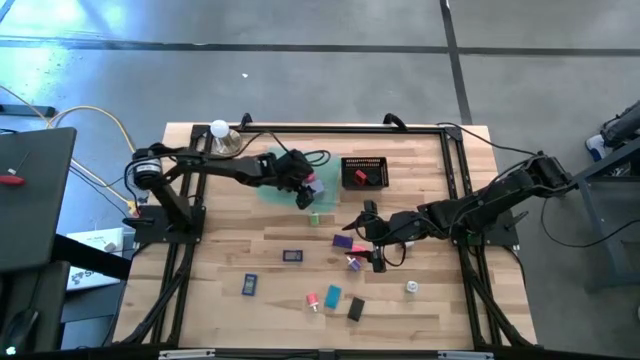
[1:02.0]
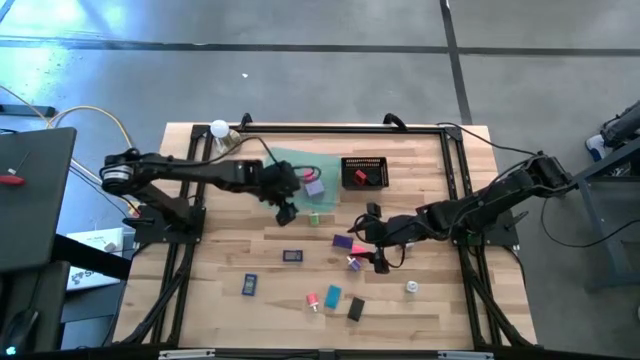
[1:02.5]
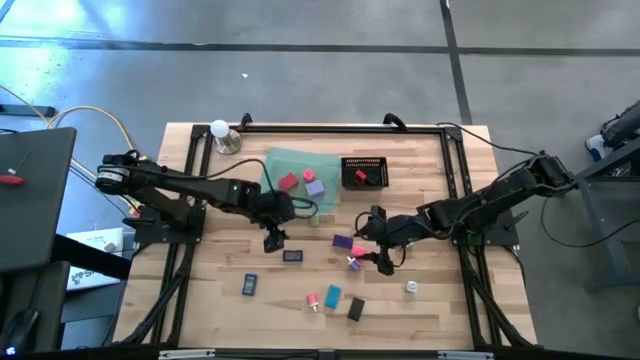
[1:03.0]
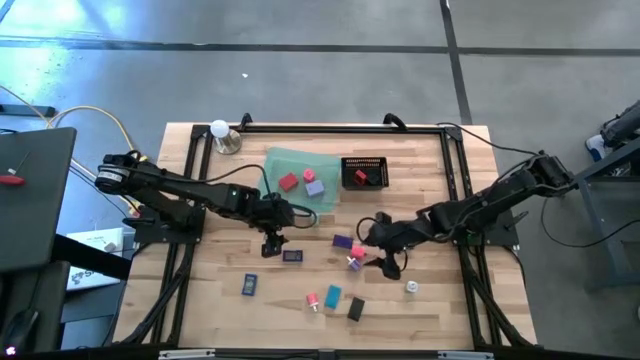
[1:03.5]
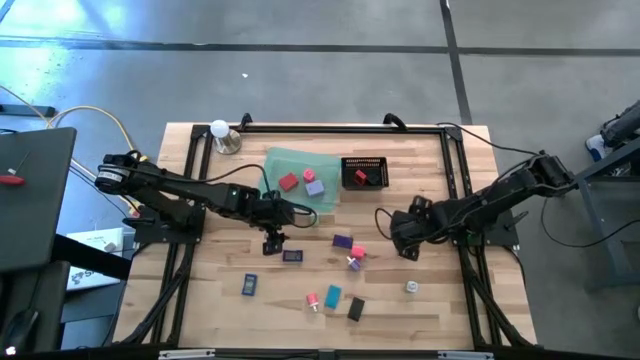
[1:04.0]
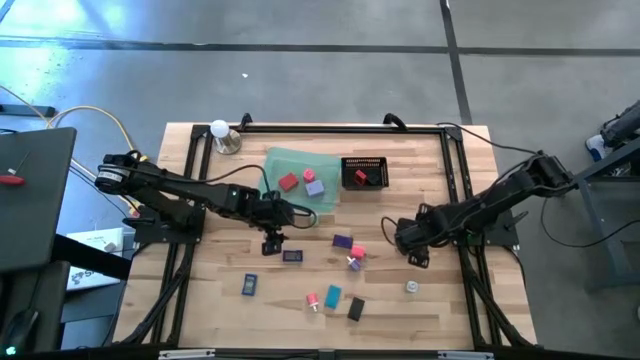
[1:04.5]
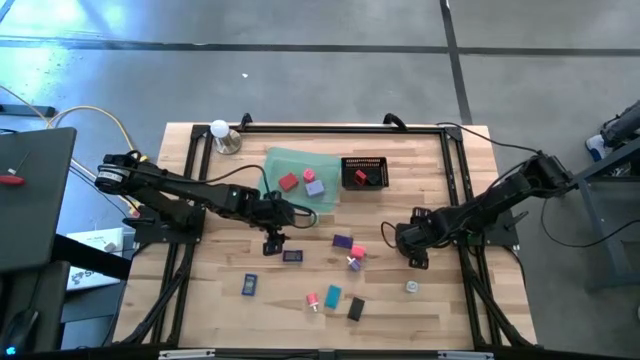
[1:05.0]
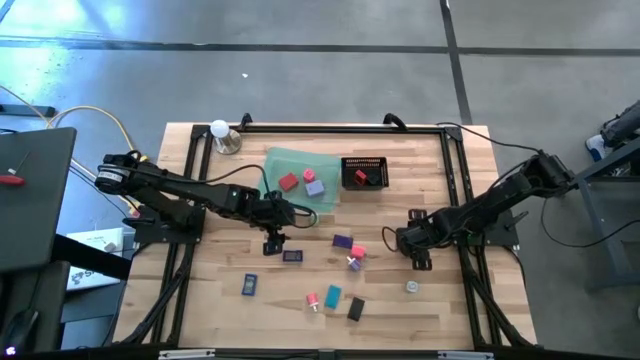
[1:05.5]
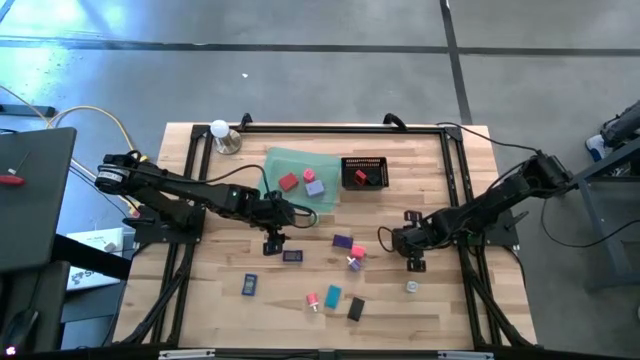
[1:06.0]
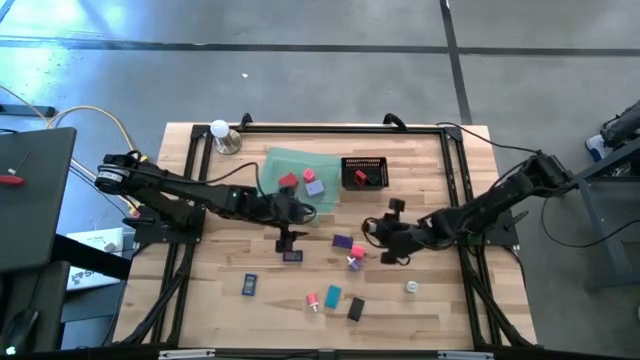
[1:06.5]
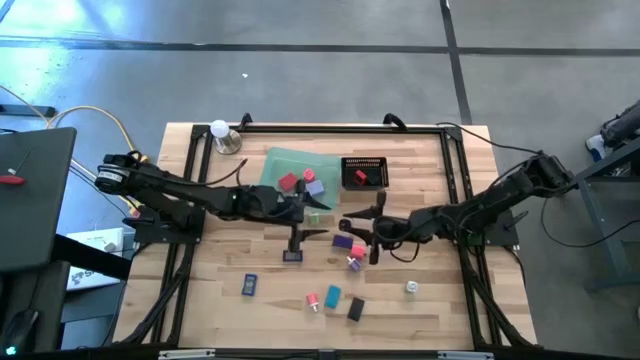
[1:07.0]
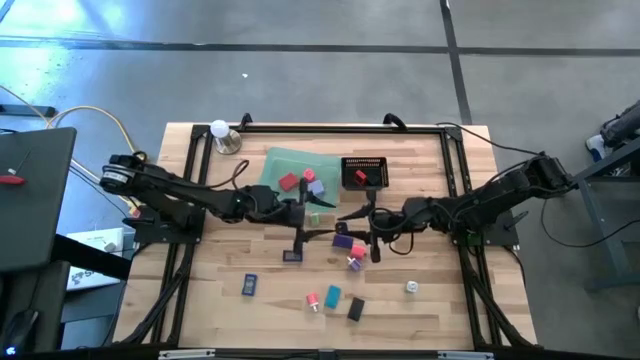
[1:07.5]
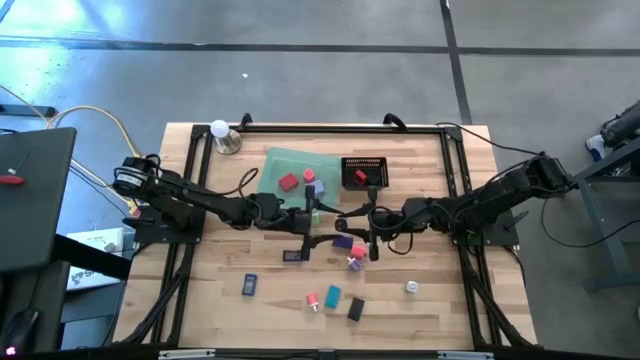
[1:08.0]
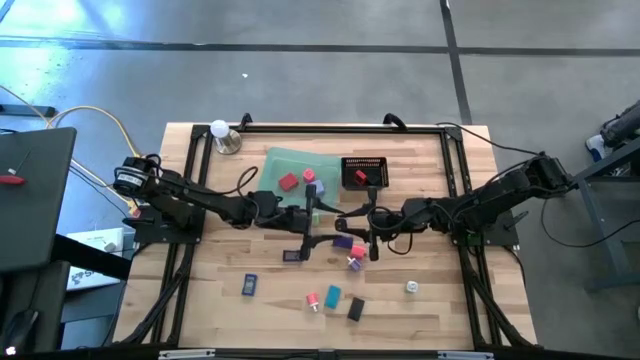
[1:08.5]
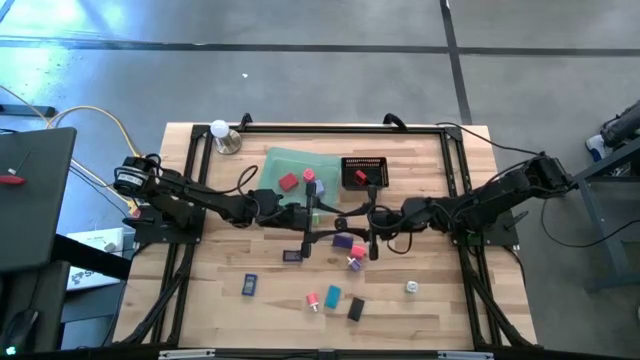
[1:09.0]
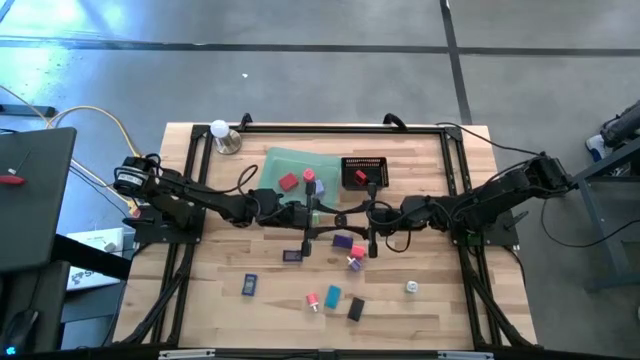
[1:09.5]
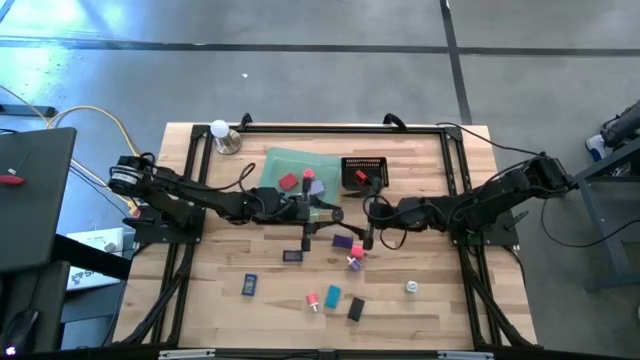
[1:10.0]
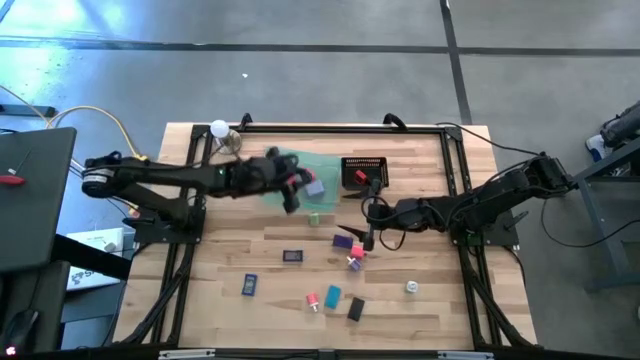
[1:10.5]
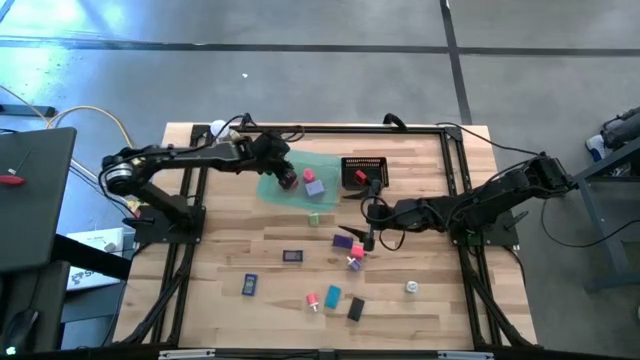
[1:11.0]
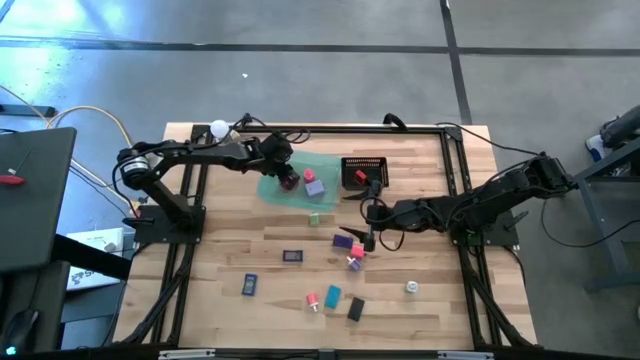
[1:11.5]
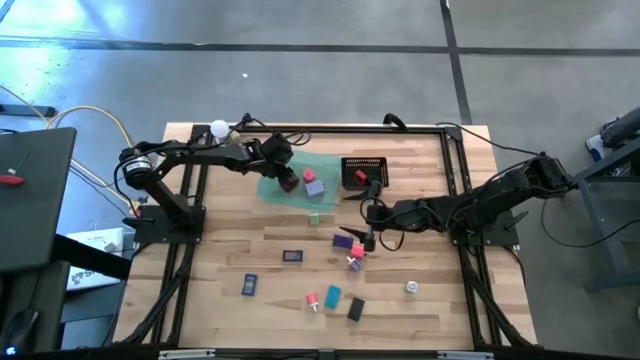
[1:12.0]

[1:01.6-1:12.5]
Task: Pick & Place Office items
Put the white charger adapter into the green bin

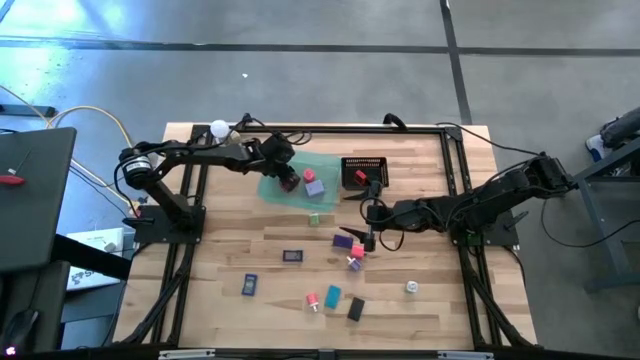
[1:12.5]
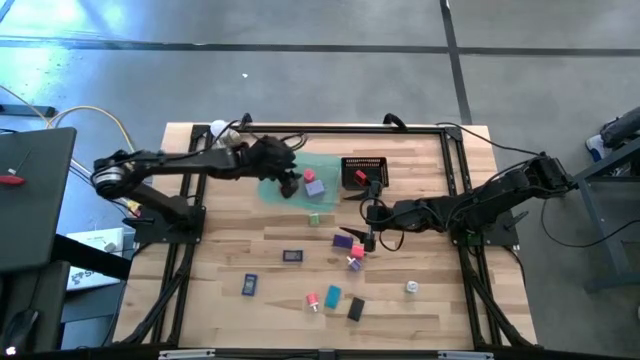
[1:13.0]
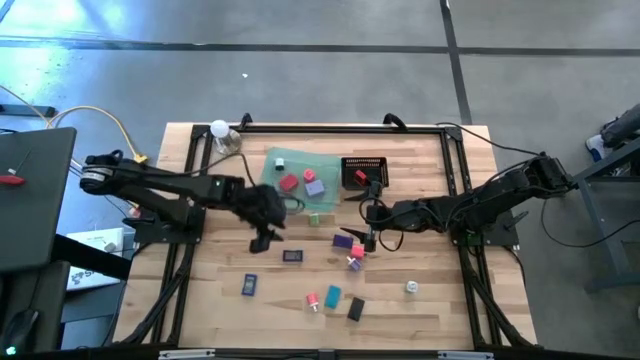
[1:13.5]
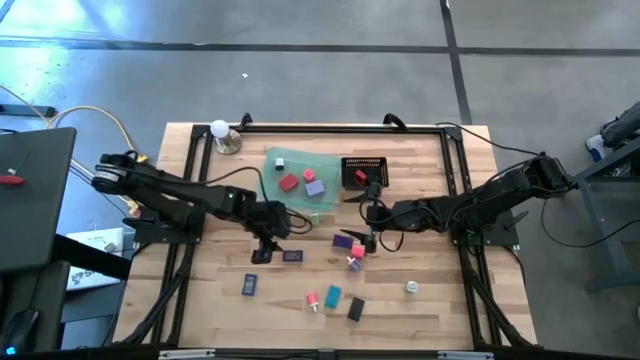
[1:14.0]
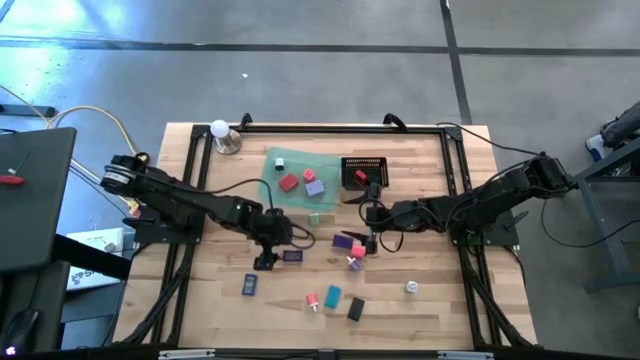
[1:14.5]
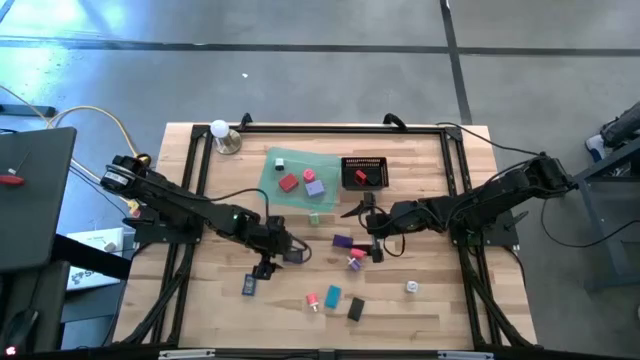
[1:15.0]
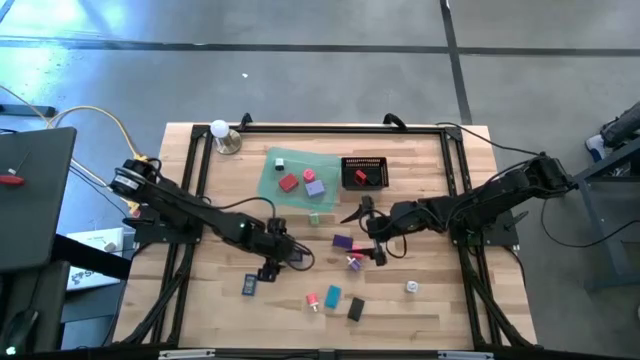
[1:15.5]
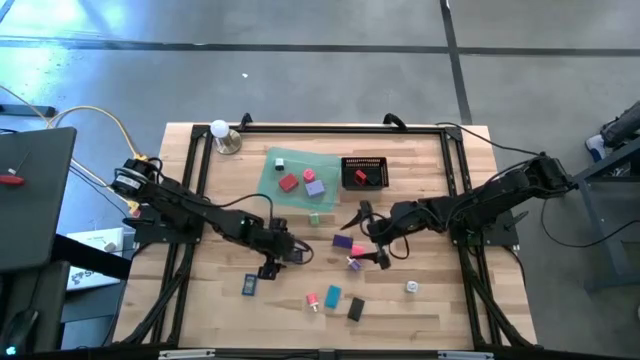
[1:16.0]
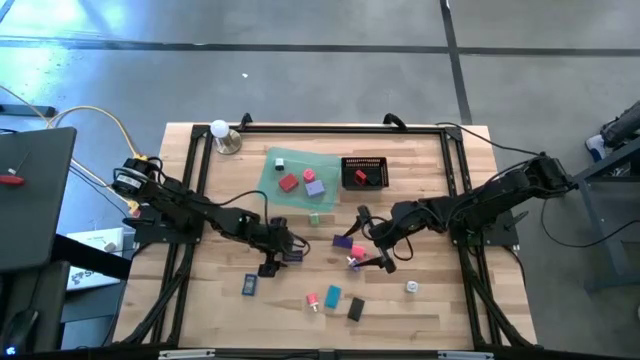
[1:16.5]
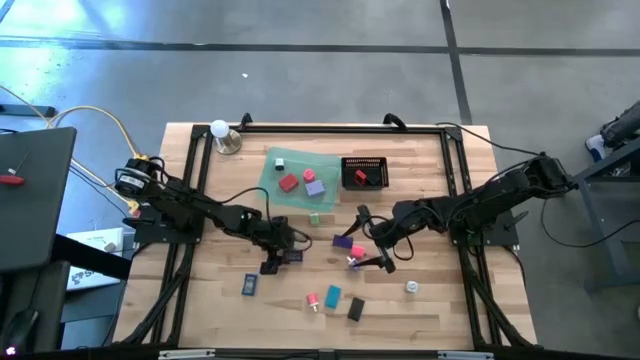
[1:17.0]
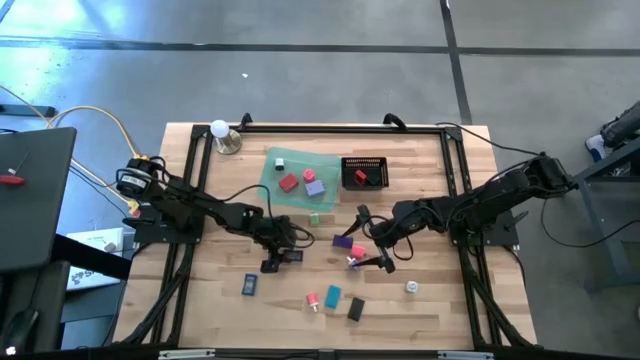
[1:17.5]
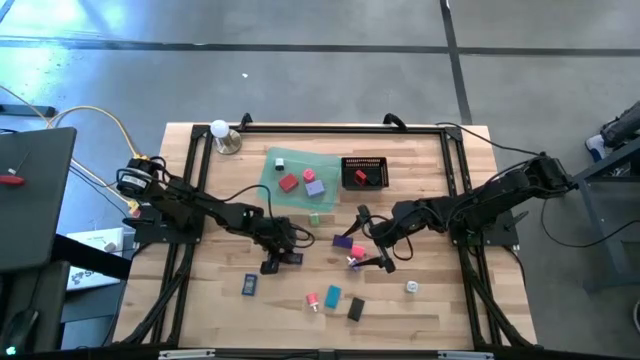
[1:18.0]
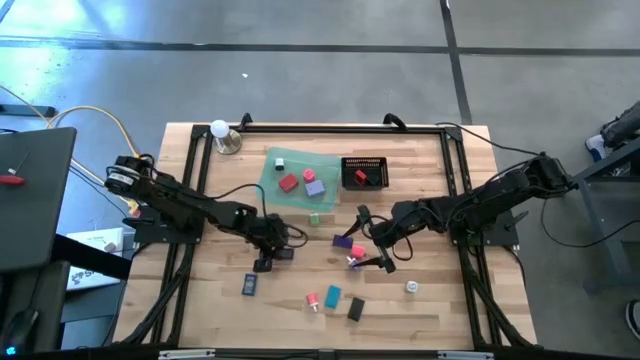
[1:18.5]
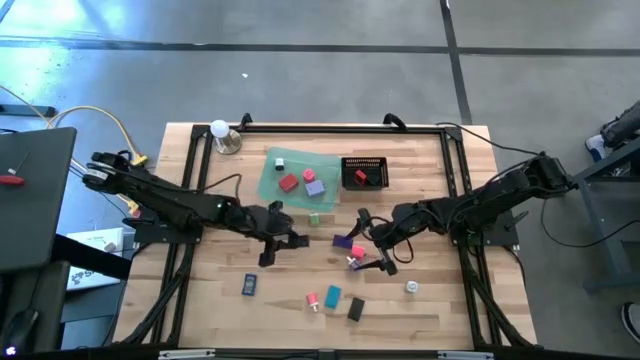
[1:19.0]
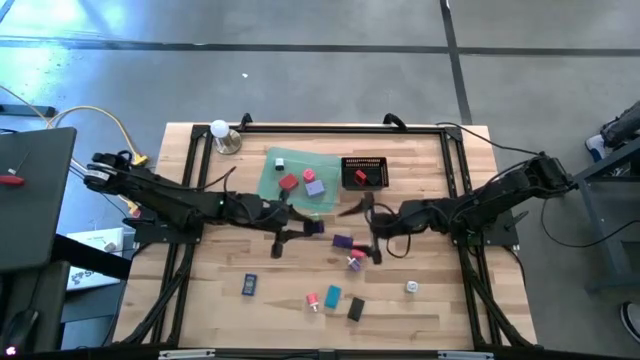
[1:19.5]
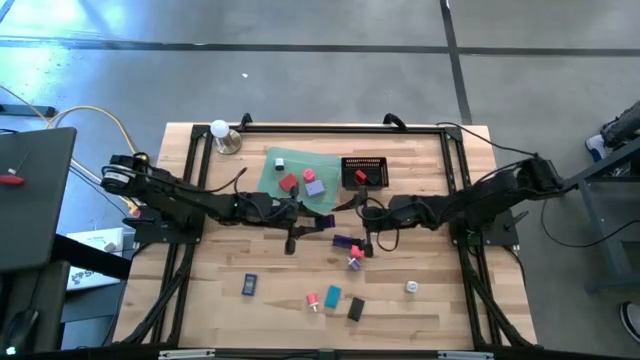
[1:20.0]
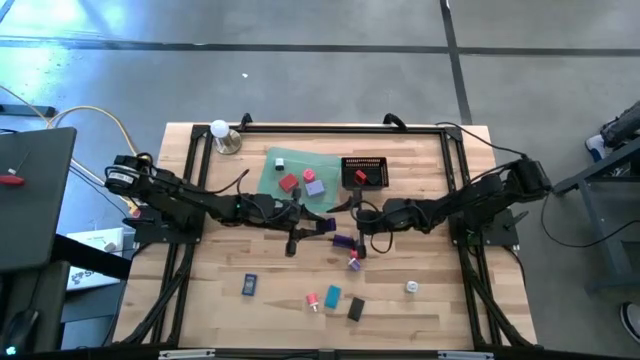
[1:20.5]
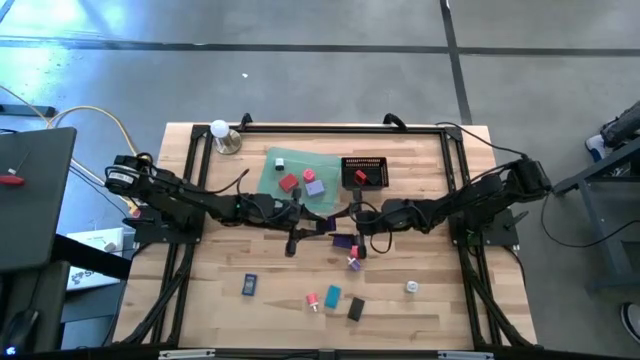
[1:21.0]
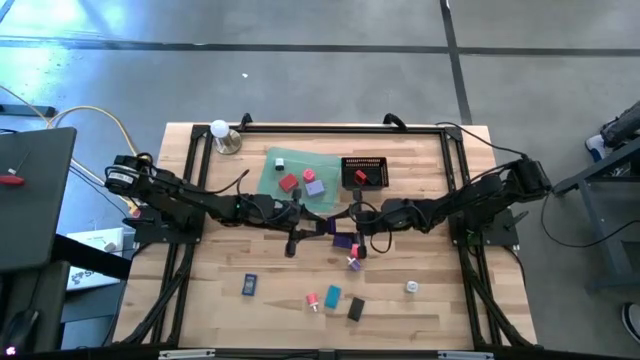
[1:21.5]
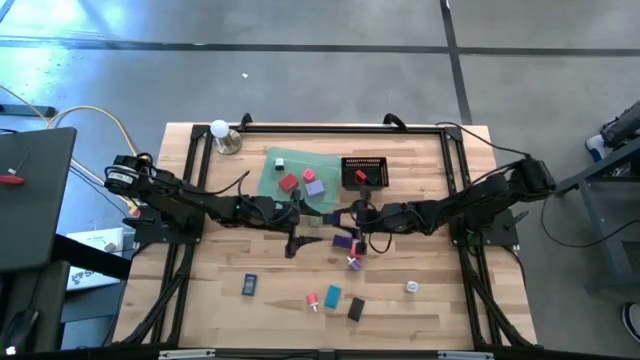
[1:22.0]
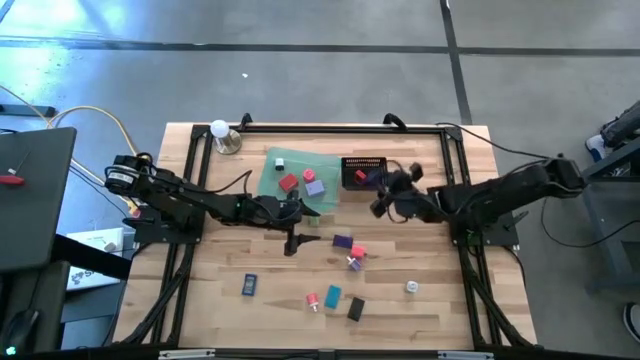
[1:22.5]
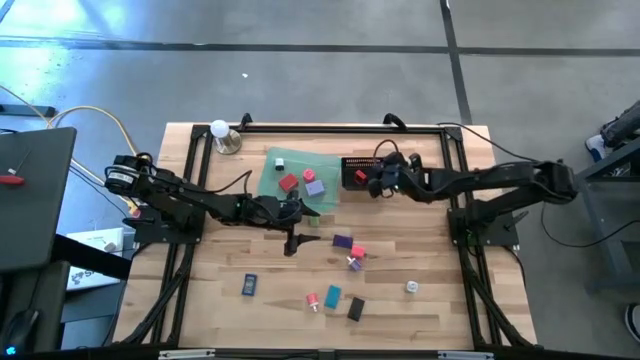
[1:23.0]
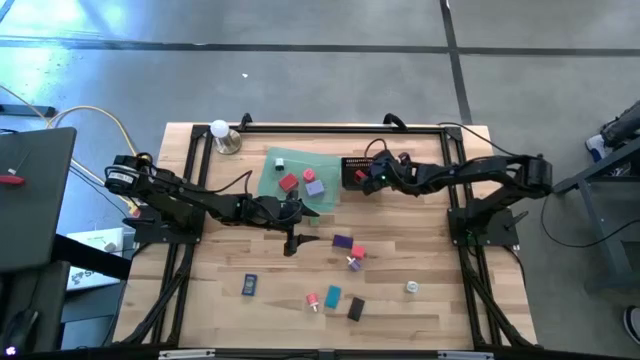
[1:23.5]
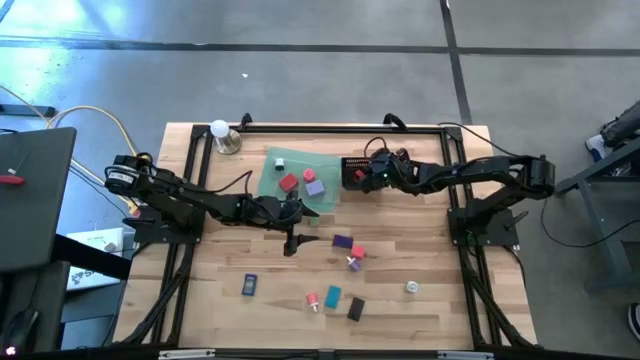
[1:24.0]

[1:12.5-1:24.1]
Put the left dark blue digital timer into the black bin
